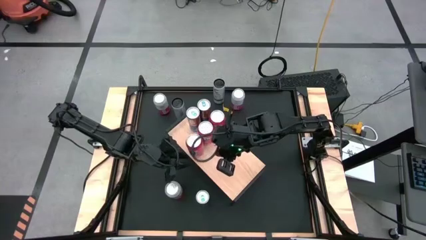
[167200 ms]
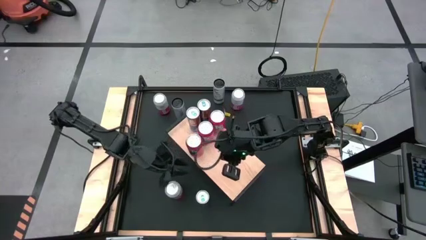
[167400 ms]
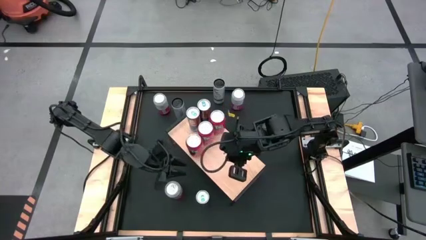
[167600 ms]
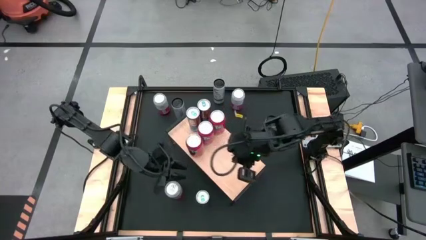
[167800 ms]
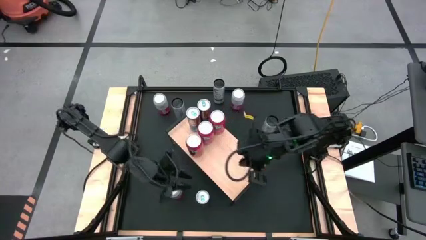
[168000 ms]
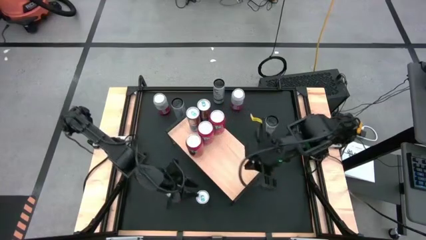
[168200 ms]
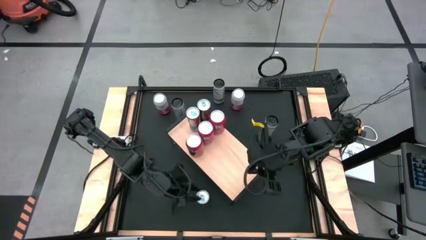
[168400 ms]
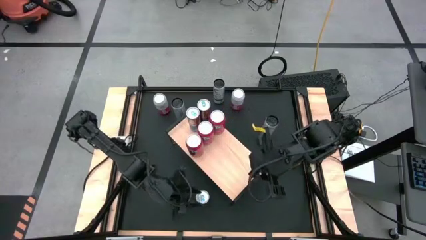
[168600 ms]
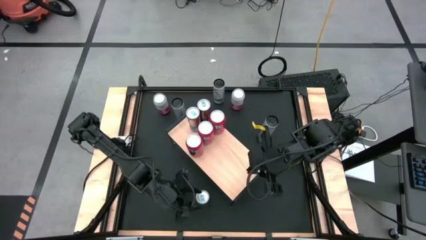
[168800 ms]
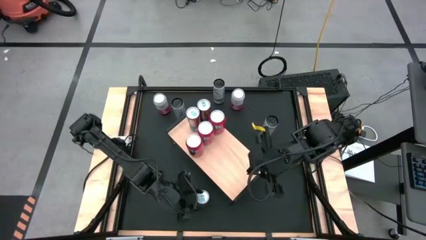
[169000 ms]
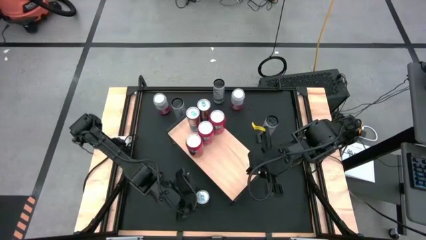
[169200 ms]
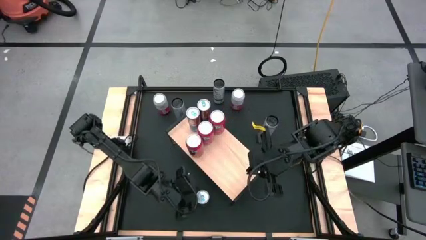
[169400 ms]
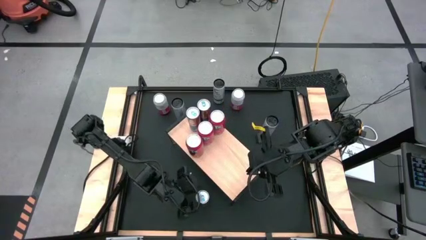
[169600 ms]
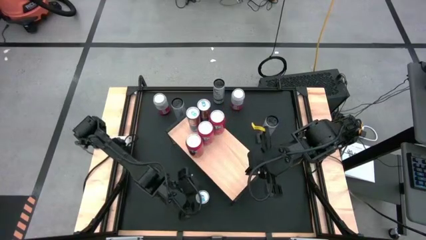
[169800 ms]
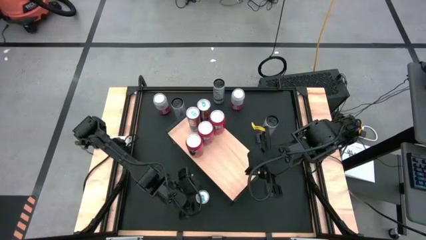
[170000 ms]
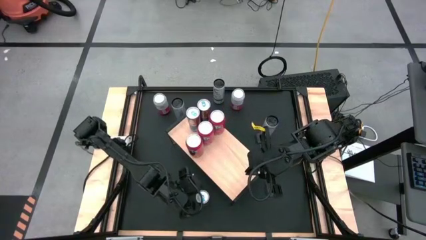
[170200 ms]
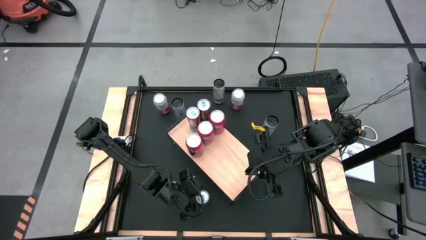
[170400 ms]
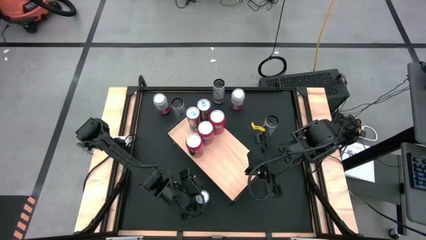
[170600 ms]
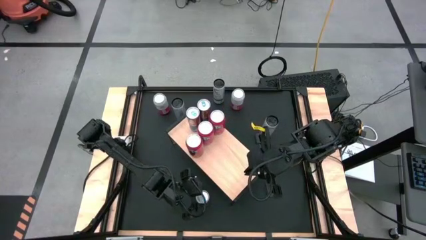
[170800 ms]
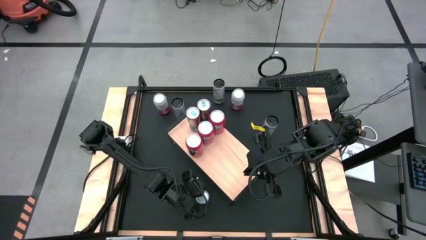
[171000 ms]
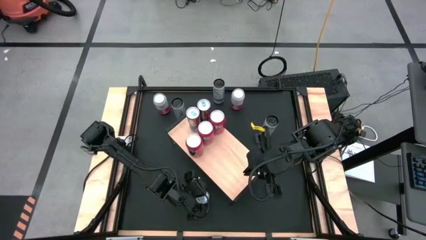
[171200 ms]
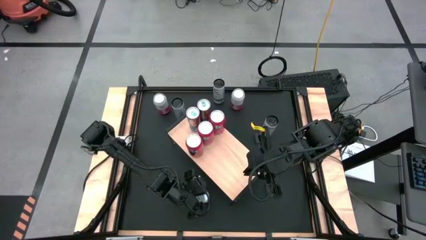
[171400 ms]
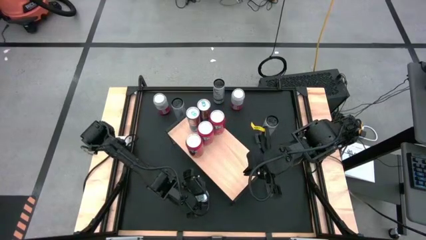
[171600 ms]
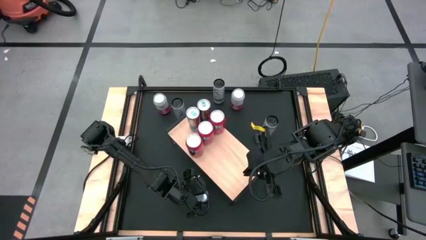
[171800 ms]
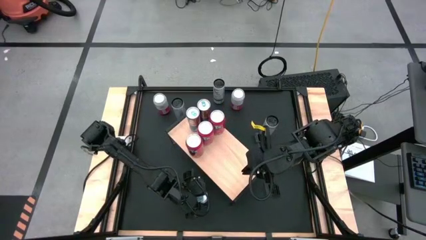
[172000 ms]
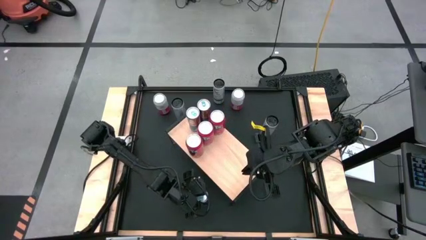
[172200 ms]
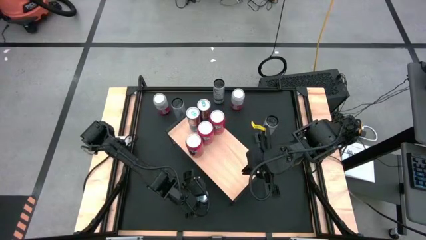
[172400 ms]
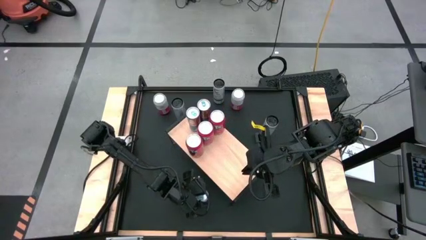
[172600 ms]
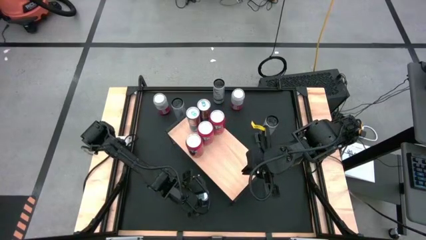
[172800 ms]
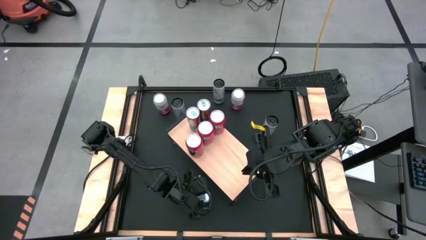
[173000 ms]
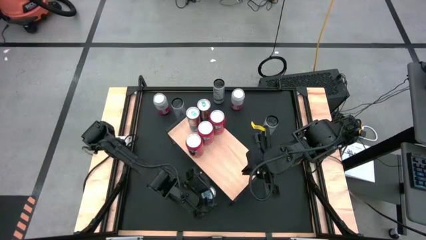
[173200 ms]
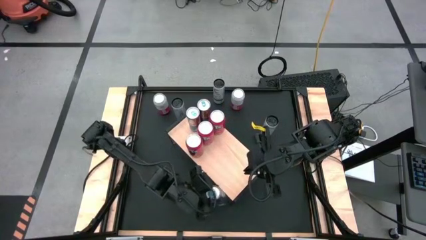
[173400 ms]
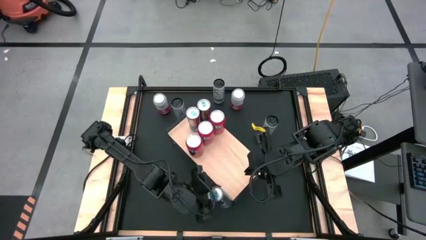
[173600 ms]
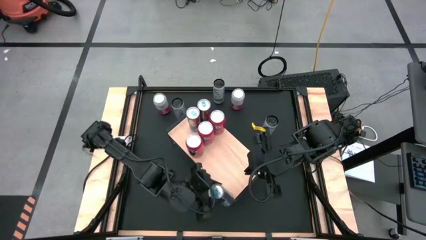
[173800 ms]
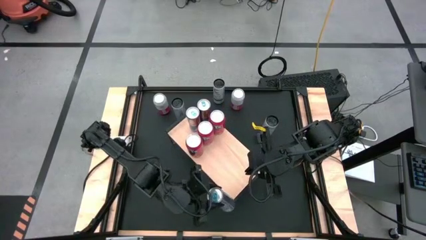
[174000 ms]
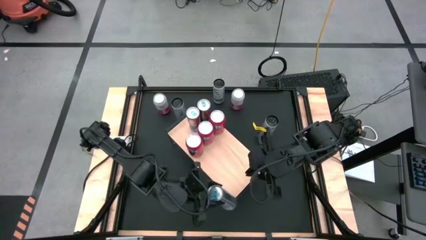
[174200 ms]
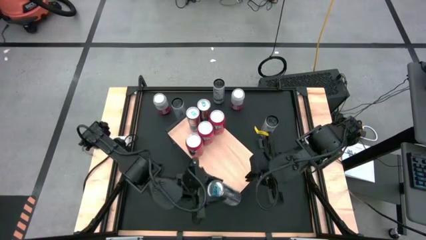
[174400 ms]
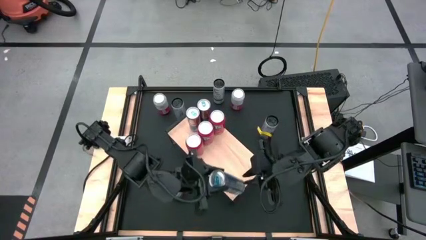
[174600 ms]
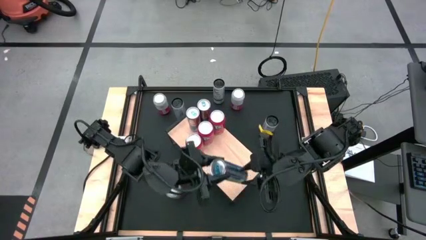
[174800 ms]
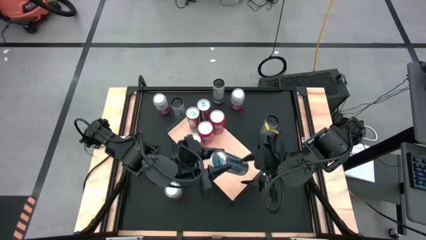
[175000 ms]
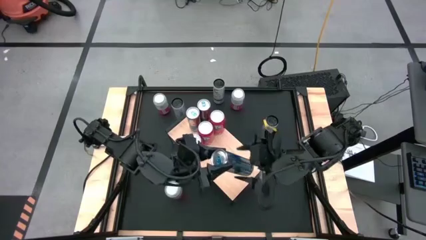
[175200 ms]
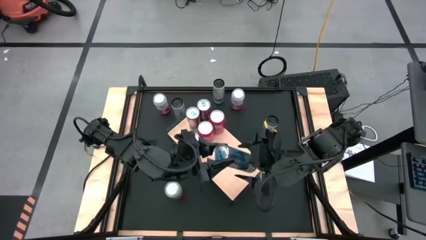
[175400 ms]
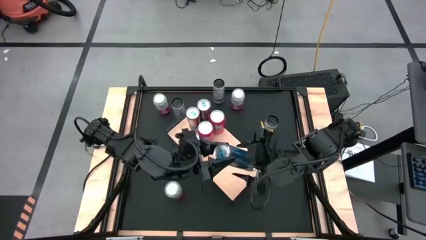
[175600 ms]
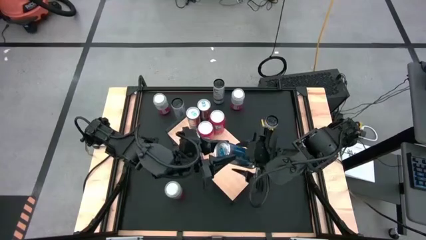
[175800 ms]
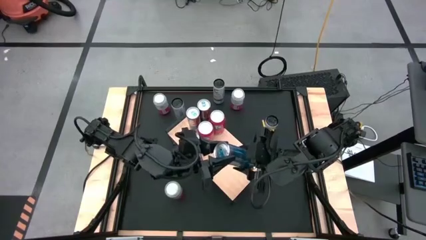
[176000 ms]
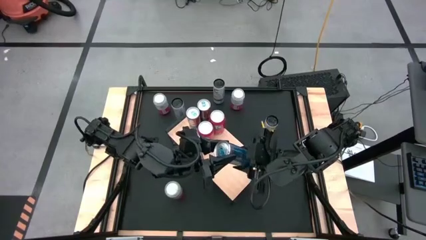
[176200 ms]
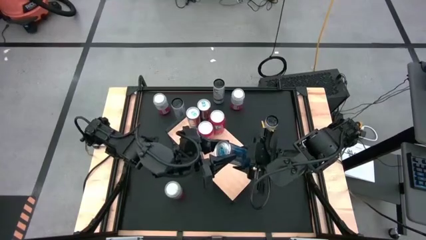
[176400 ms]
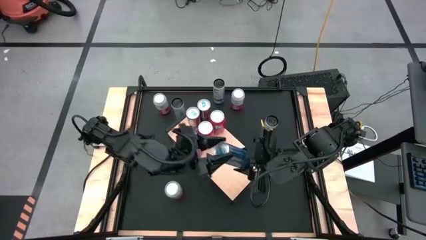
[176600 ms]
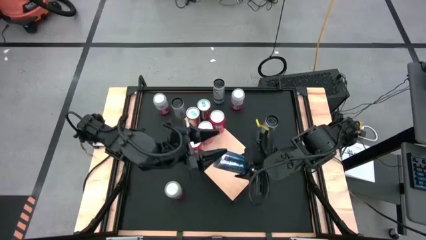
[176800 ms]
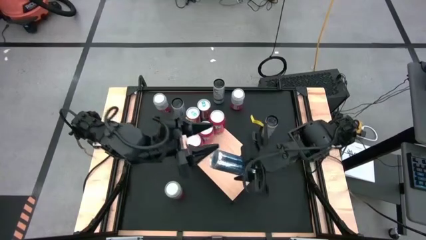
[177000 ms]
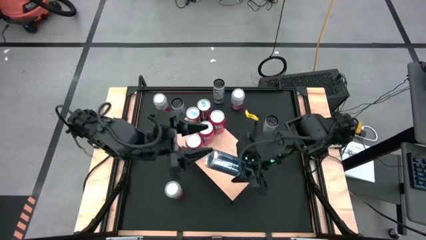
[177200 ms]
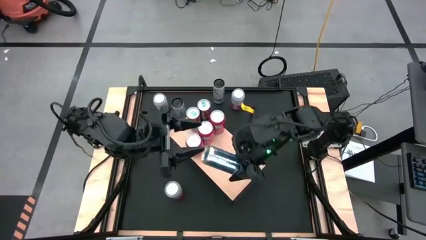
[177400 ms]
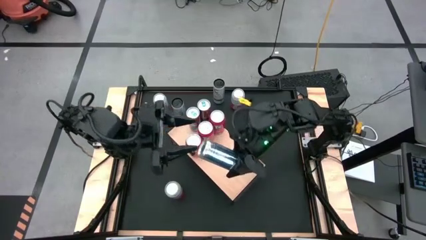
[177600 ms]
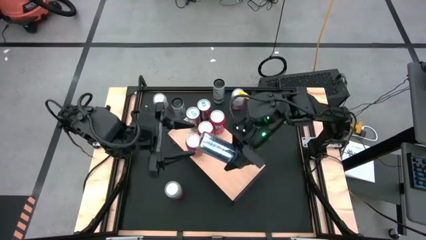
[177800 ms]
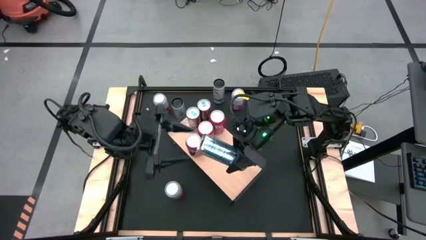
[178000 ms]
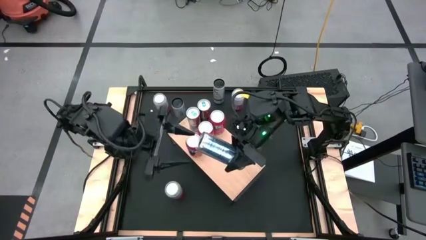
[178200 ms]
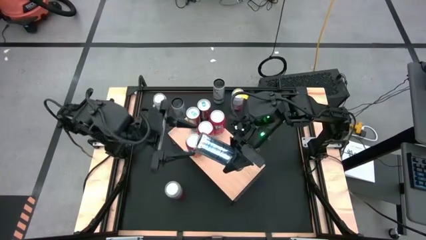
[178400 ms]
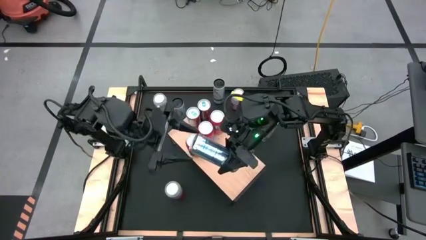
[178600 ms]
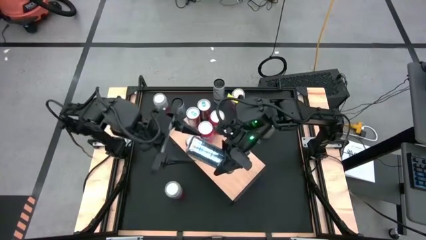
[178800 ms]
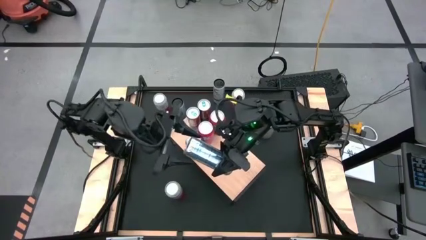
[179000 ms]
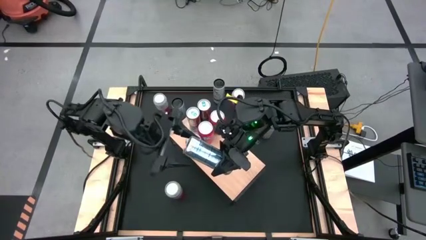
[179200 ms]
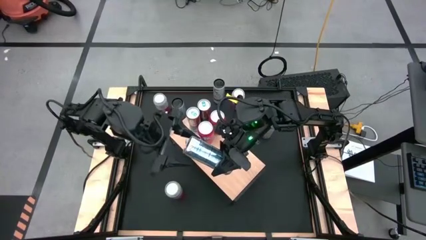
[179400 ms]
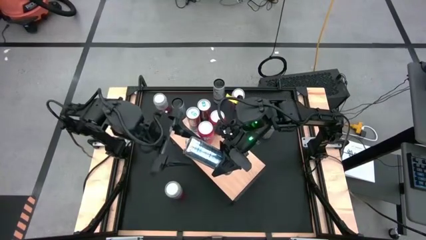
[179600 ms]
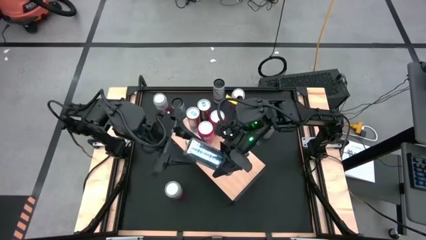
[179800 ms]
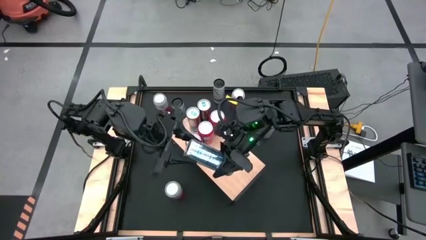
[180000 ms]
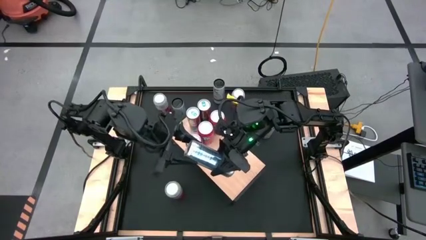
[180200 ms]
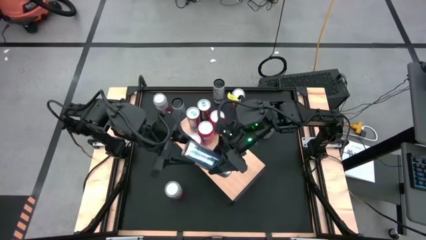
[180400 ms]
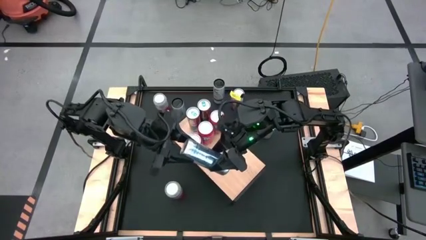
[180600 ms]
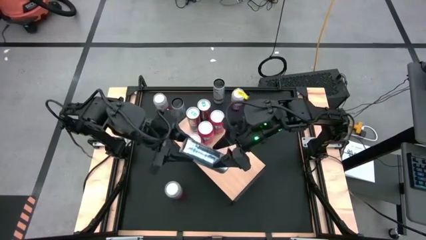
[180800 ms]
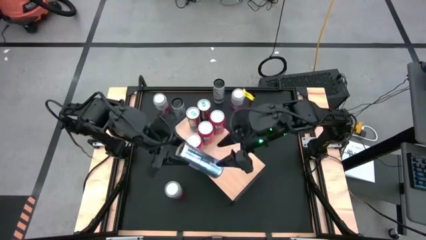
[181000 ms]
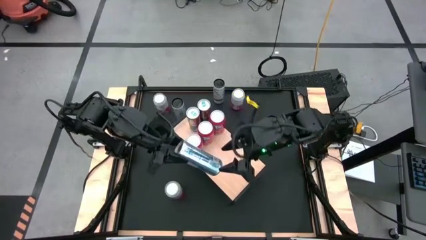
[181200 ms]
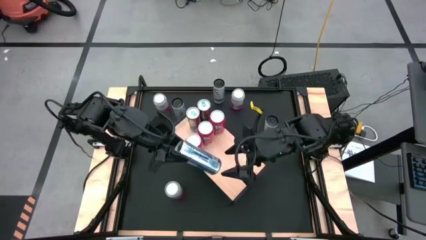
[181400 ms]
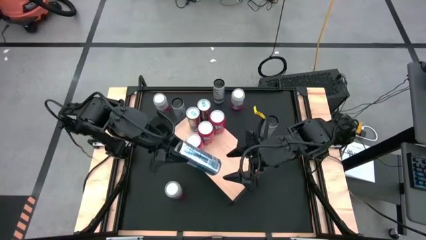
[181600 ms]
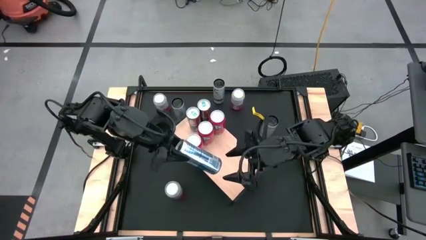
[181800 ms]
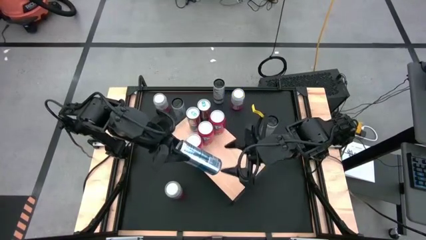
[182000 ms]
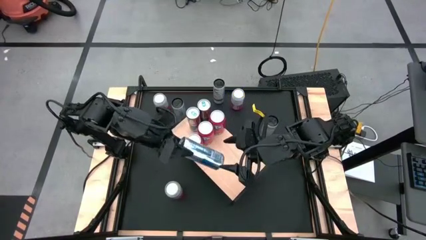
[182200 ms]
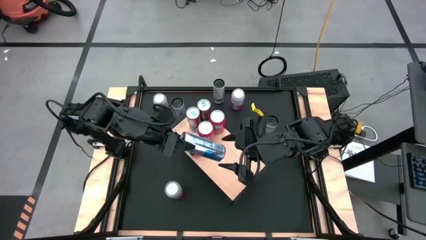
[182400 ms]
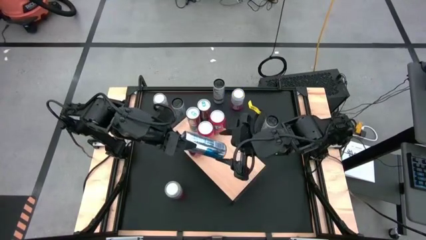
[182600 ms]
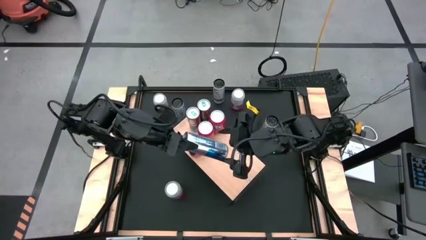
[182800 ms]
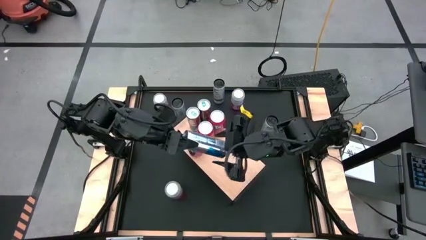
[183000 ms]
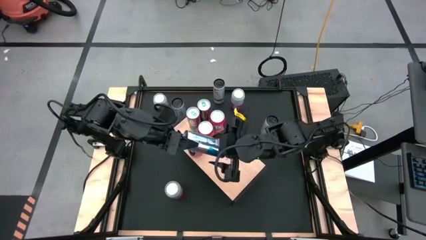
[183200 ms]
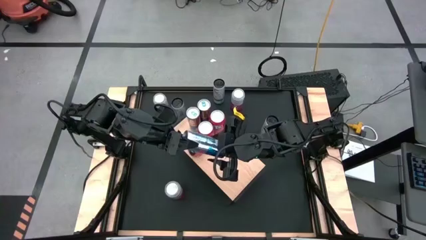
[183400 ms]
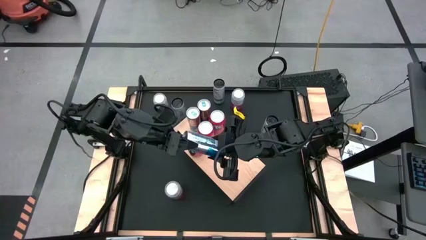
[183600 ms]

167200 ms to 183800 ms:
Task: Place canned beverage on shelf
Put the blue soda can on the shelf aligned with the other blue soda cans

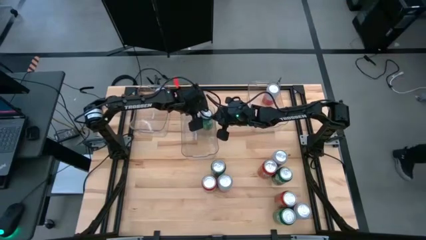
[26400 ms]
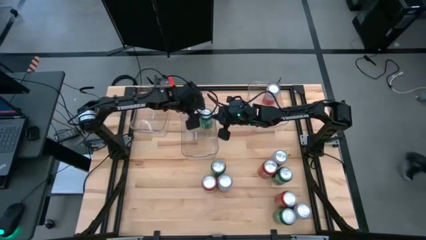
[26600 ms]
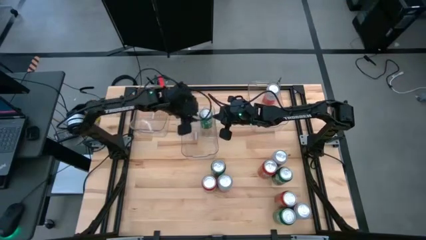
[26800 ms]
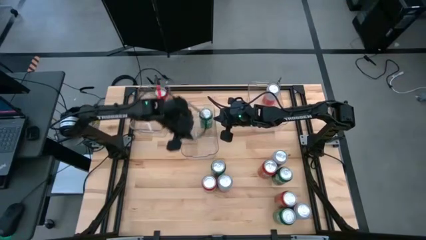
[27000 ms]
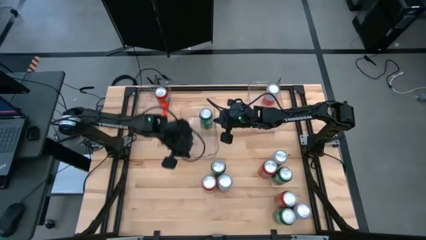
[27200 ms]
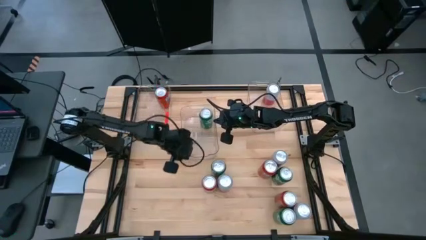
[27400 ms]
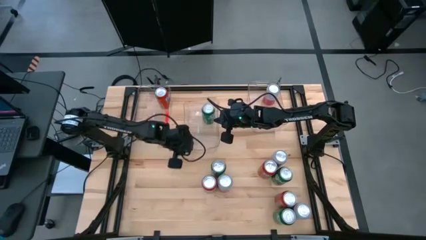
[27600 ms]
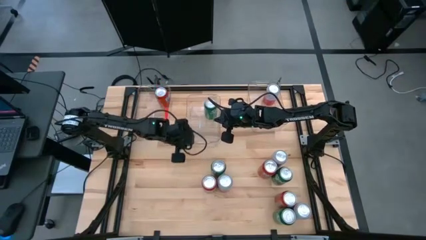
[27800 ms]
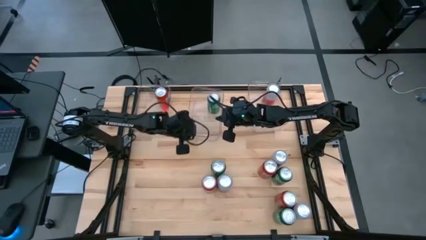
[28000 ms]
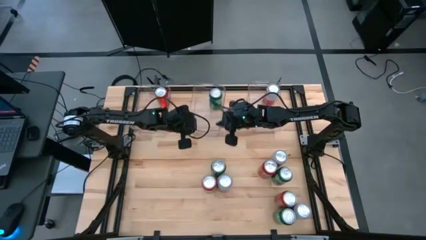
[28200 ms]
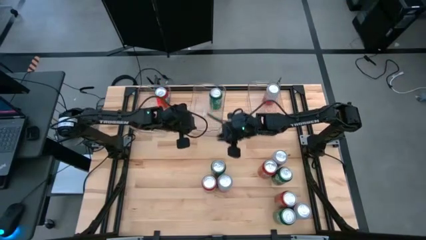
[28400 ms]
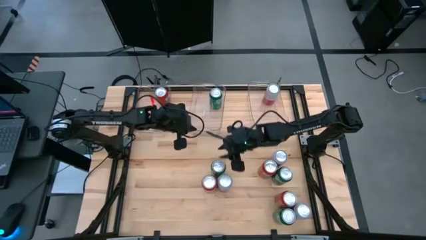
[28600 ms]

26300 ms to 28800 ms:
Task: Sort soda cans
Adjust the middle transparent bin
